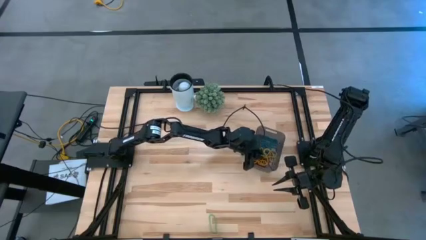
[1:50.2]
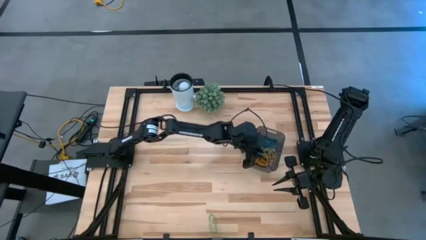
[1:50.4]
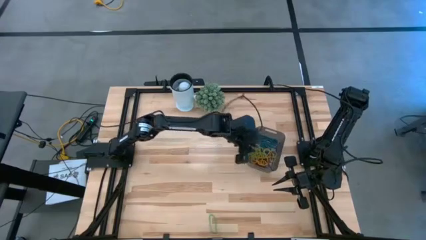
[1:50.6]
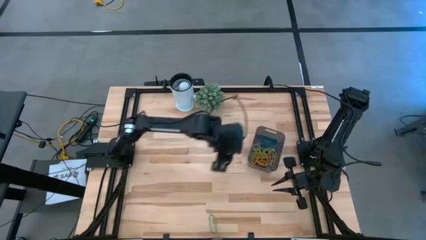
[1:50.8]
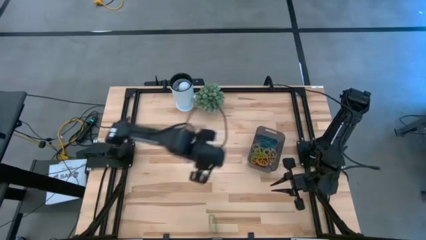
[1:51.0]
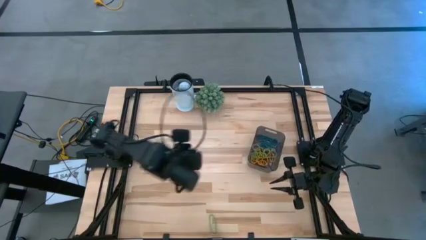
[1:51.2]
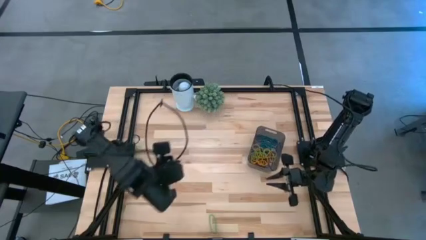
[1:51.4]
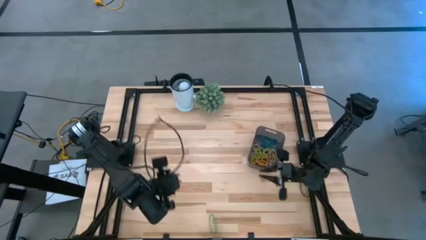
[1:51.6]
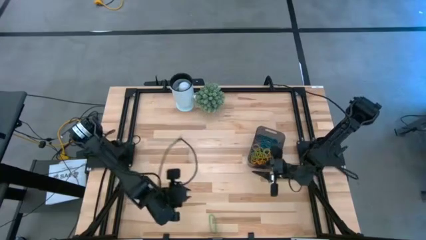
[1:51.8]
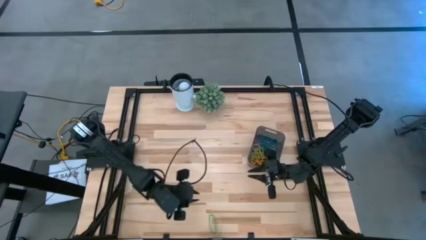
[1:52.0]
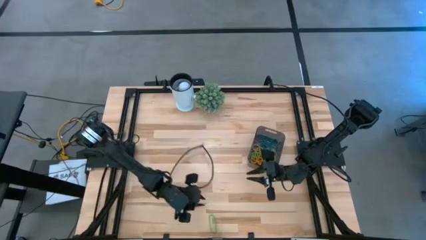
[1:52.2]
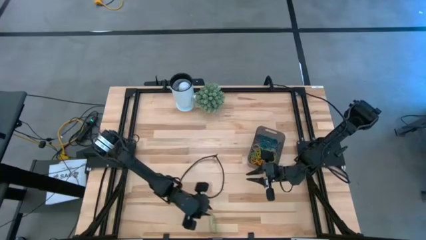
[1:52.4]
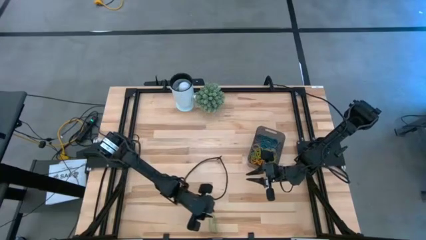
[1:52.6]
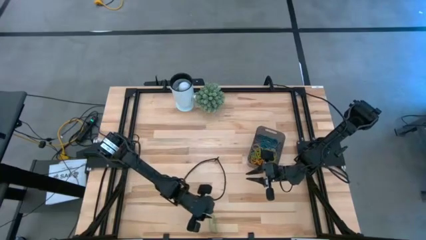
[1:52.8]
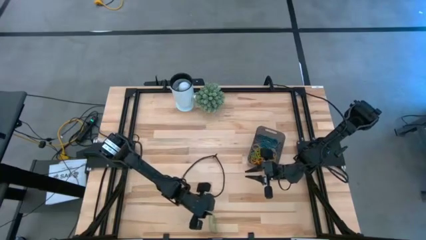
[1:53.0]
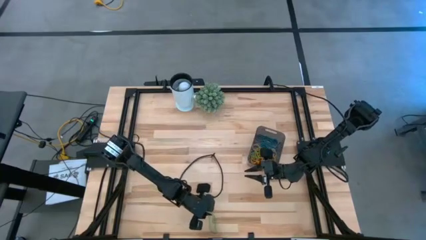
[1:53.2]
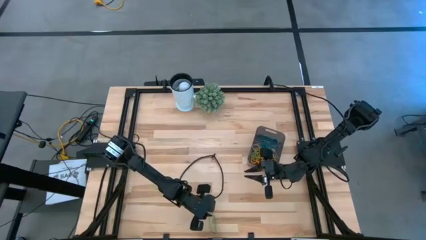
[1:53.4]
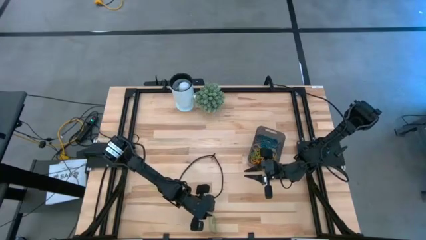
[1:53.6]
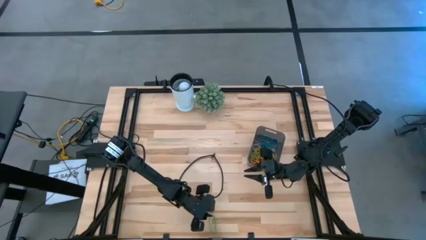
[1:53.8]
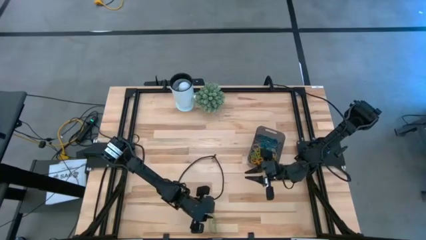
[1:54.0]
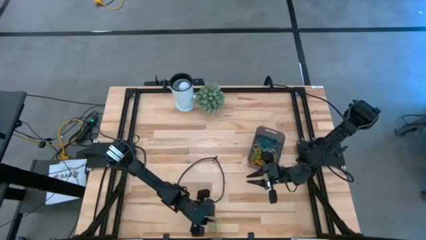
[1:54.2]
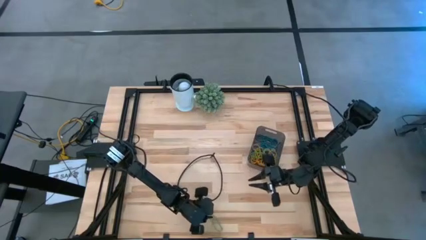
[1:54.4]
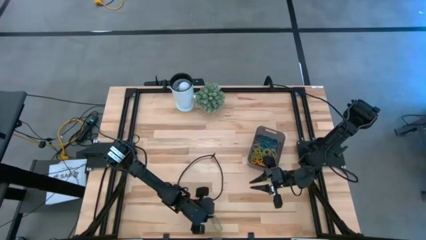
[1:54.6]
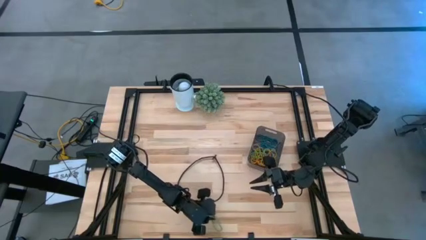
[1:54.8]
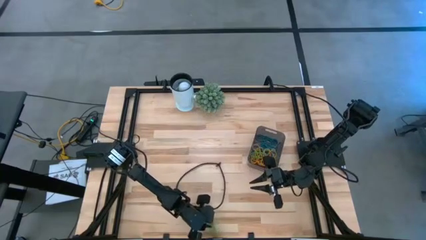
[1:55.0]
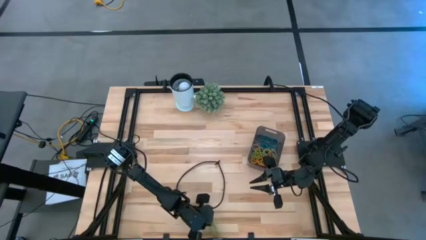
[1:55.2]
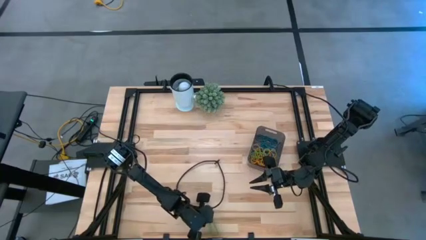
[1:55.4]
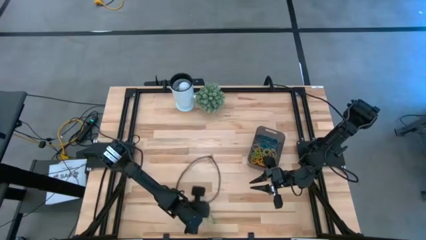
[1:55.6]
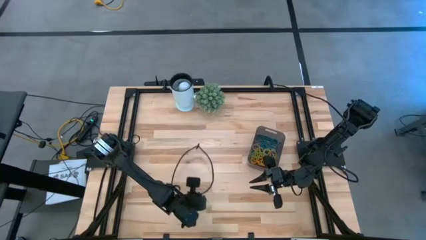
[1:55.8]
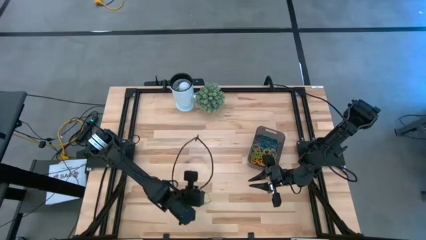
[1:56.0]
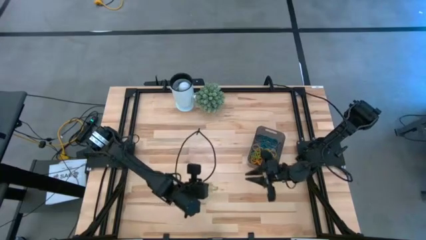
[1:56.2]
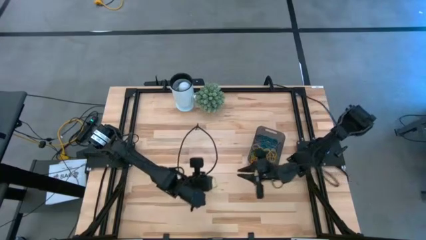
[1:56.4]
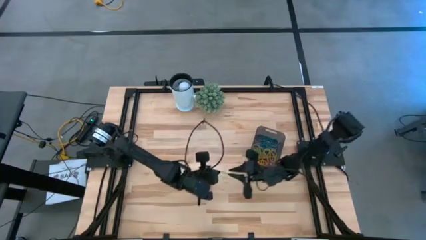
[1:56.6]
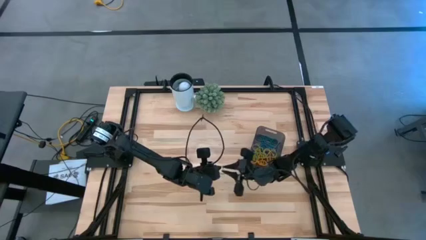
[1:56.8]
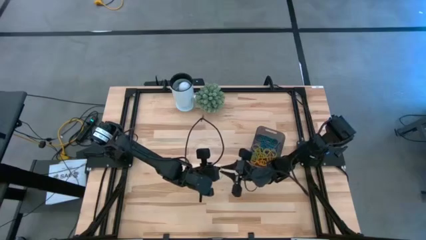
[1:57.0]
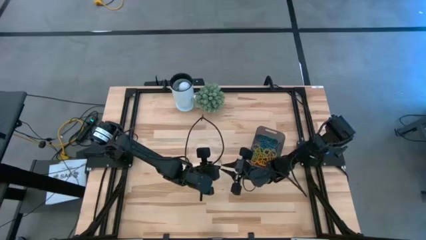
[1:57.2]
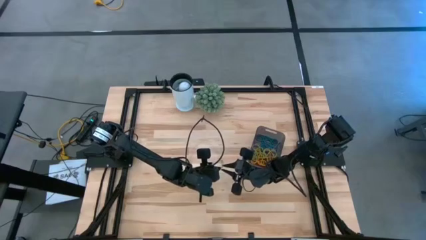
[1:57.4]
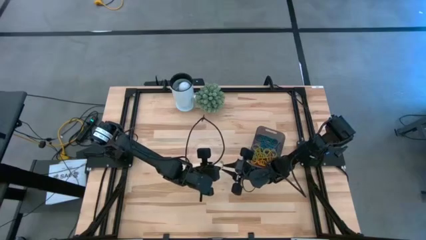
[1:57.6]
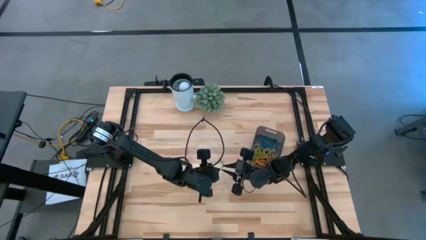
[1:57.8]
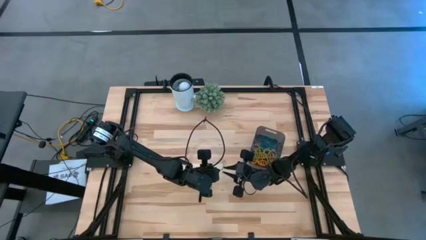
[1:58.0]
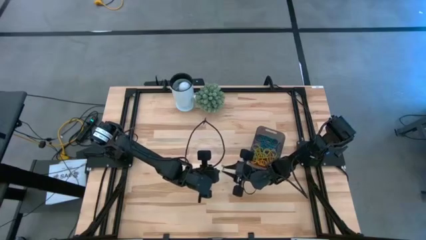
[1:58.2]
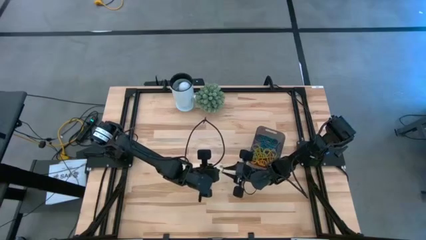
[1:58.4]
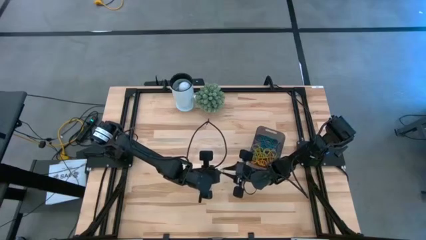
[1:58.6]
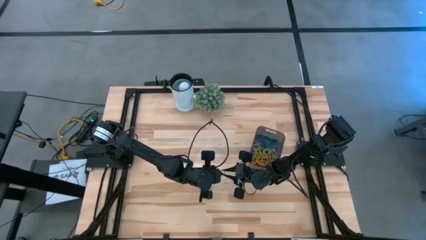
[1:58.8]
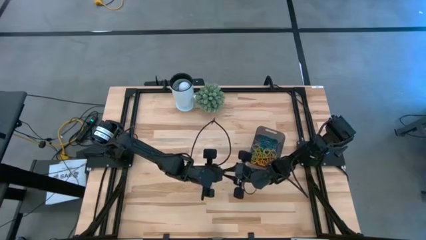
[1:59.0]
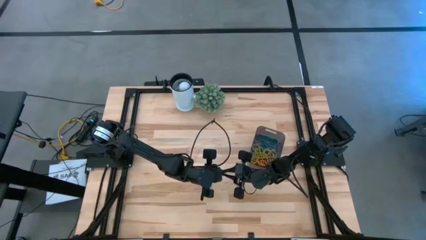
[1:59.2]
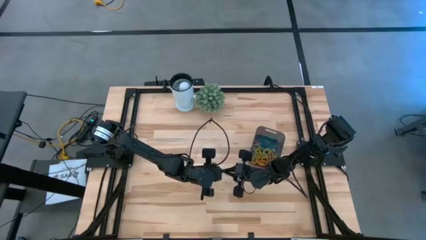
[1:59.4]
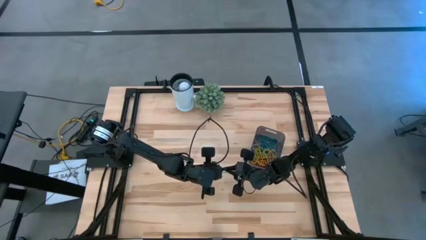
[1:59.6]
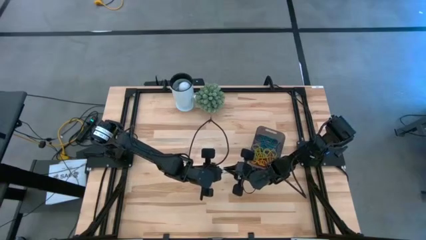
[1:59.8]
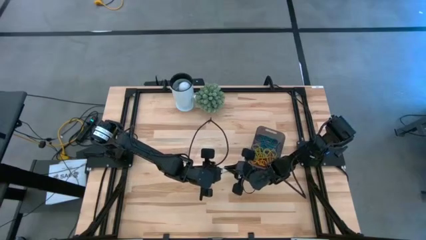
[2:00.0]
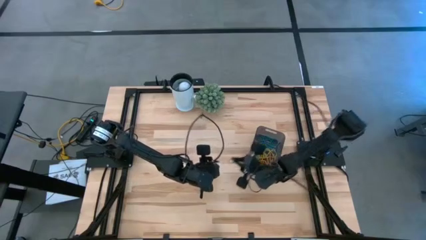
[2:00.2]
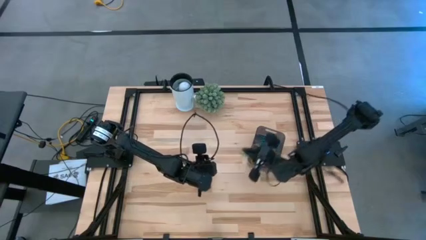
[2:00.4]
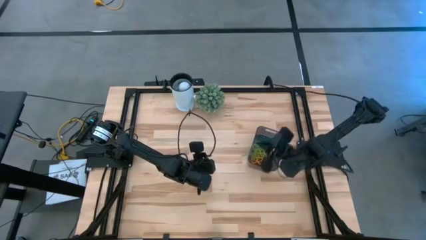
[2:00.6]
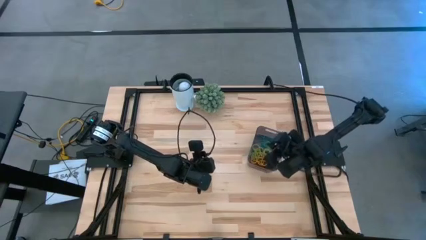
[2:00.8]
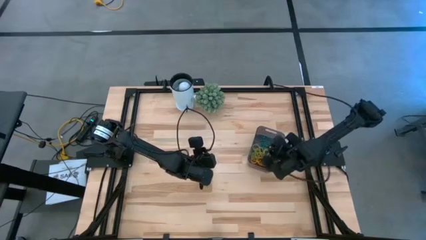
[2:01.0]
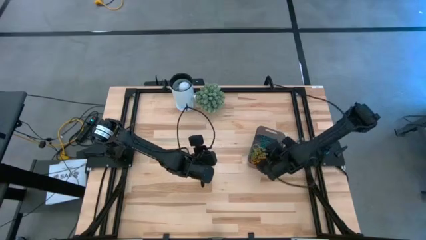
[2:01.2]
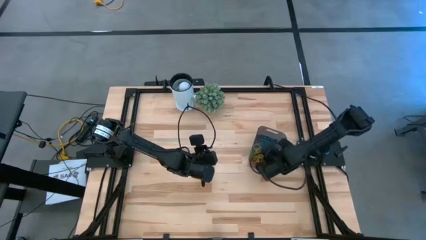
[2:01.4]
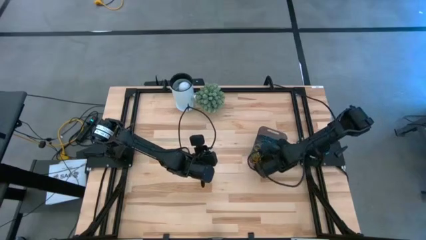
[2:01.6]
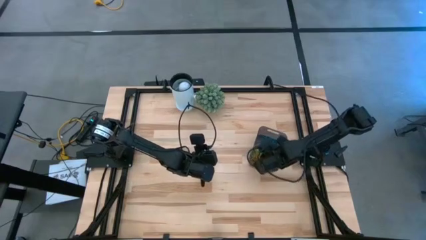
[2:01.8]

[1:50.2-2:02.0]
Task: Pick and place items into bin
Put the green rubber band into the black bin

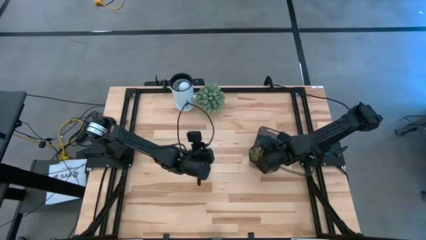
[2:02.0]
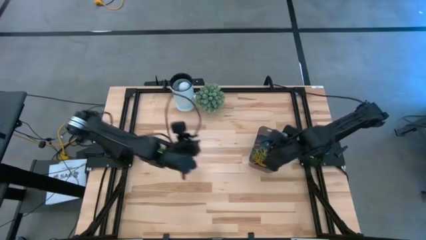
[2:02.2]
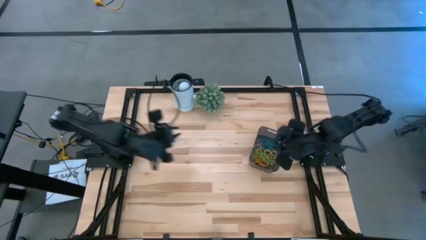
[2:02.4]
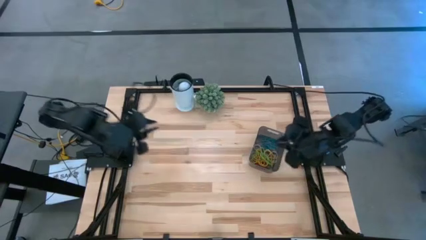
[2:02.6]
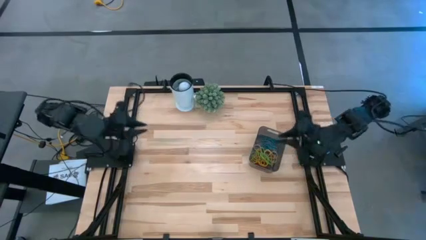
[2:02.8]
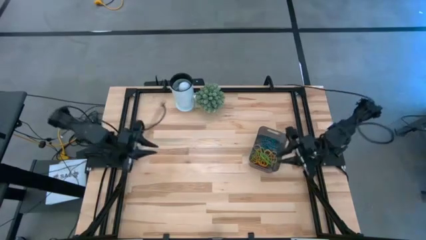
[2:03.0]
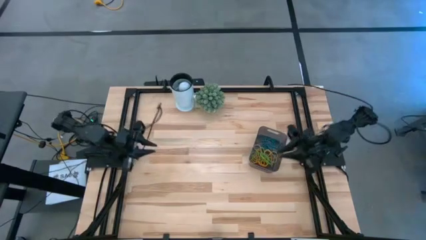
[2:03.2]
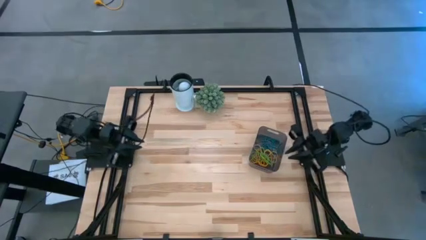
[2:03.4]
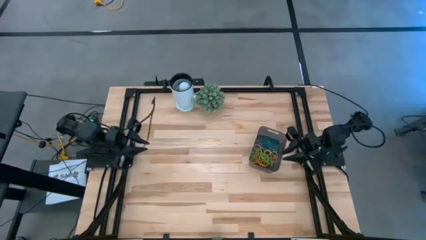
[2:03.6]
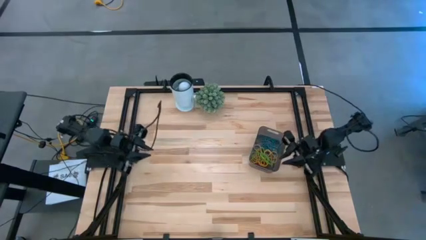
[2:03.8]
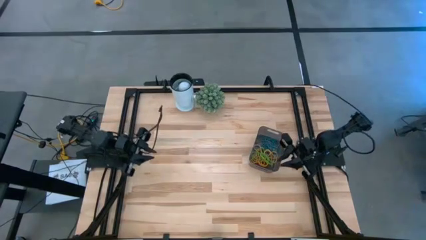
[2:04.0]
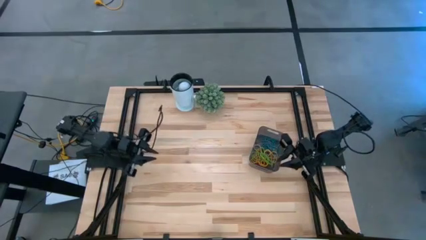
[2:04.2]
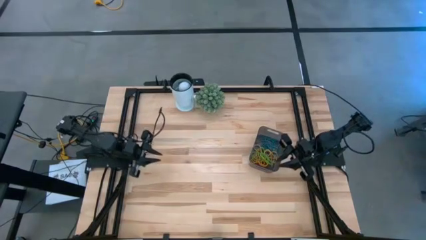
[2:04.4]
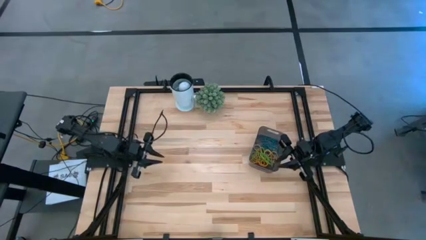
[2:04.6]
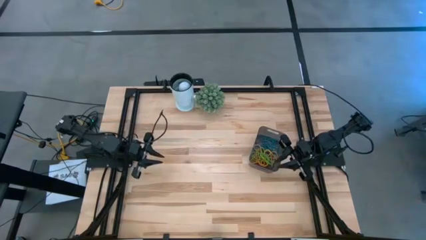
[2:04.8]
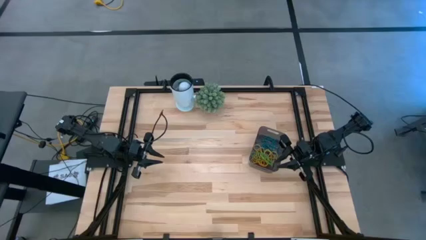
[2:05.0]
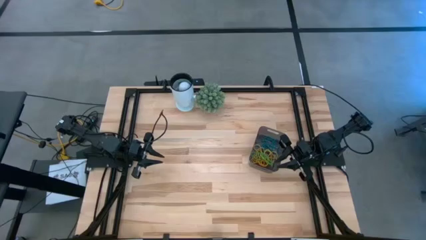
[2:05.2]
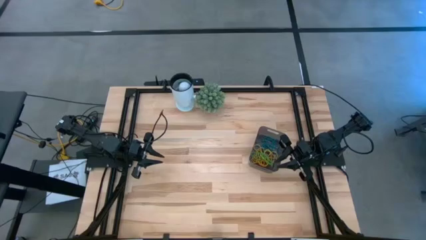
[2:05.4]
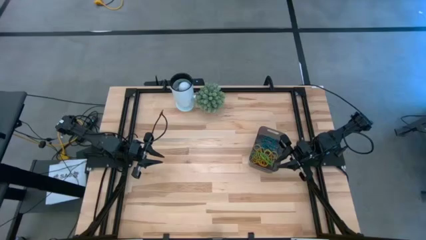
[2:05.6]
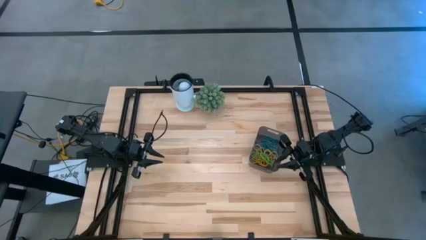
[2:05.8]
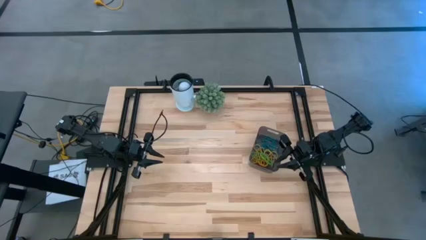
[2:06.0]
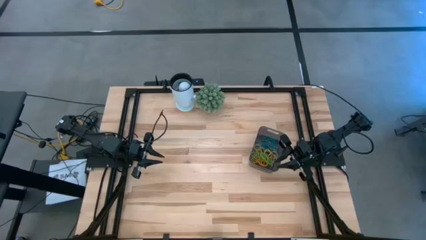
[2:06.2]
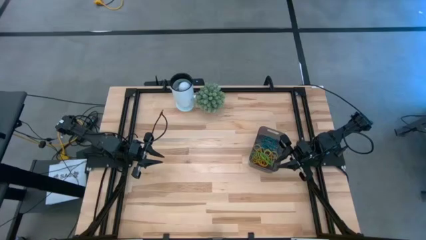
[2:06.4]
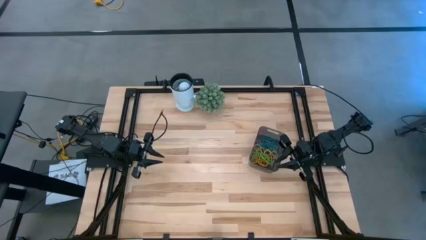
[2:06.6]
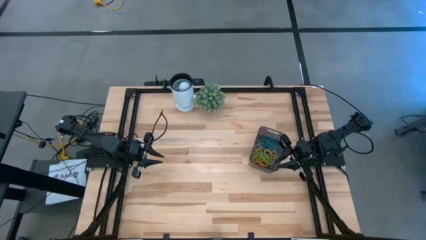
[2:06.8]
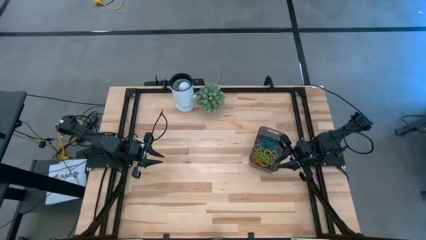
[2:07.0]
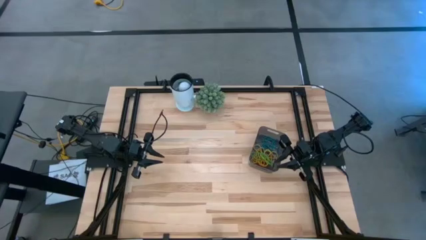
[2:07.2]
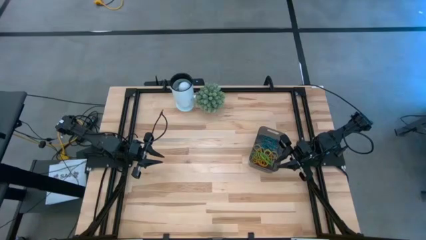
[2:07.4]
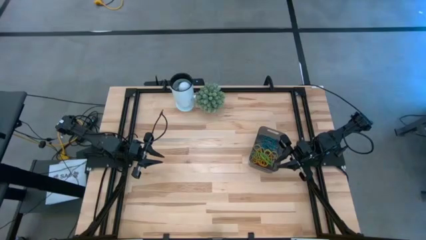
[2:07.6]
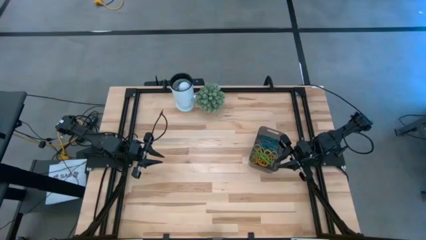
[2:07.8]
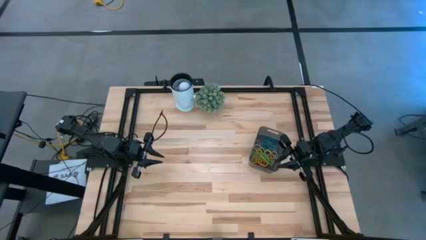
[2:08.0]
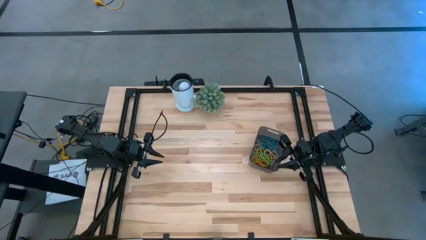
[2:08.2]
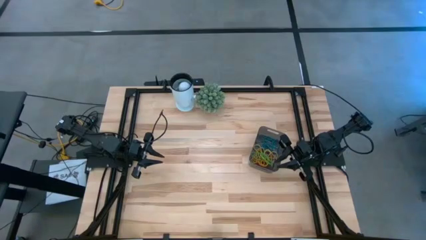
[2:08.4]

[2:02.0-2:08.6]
Return to Home Position
